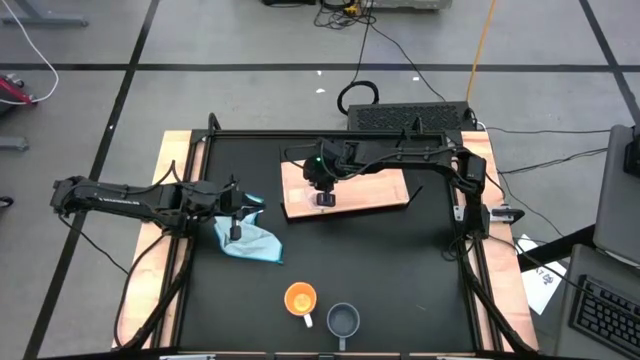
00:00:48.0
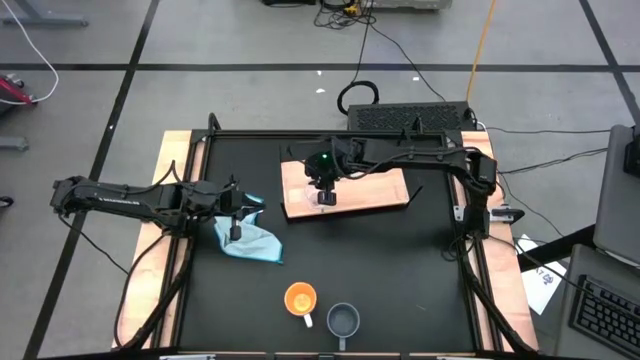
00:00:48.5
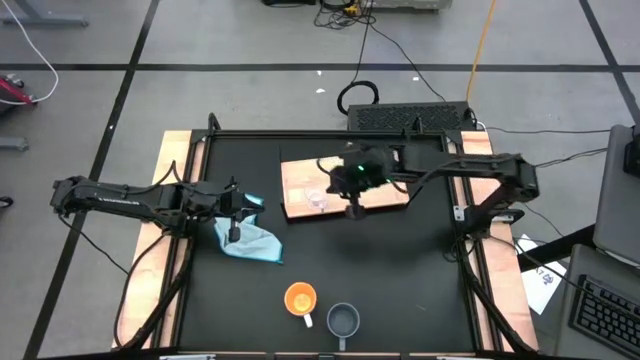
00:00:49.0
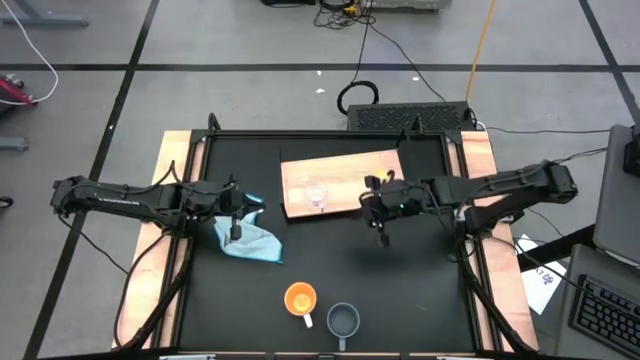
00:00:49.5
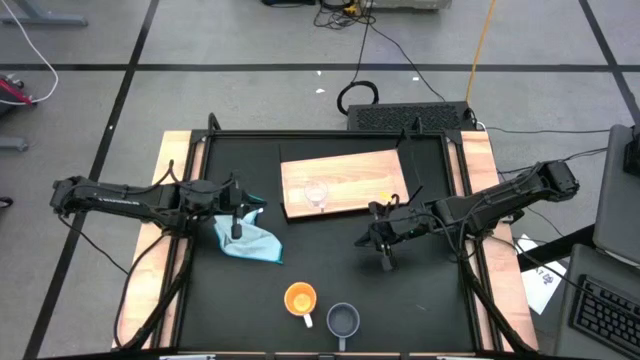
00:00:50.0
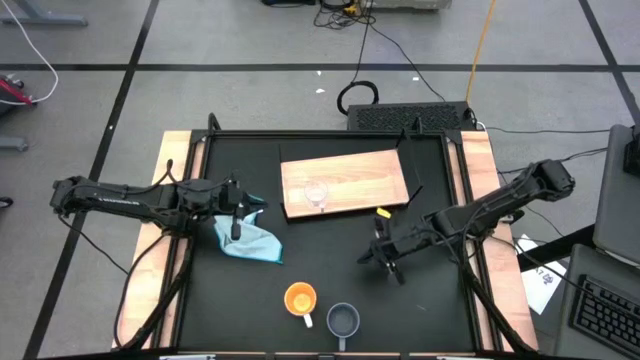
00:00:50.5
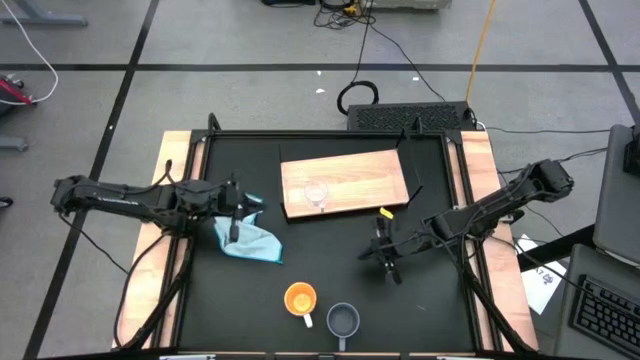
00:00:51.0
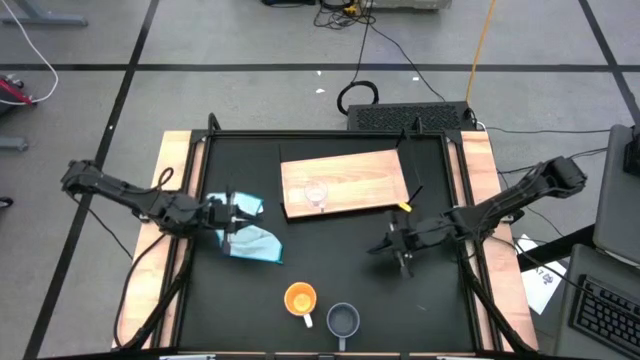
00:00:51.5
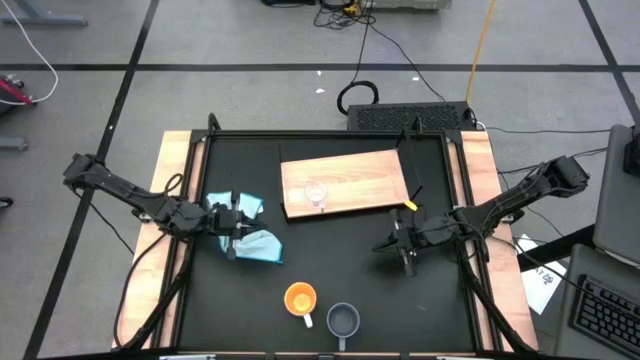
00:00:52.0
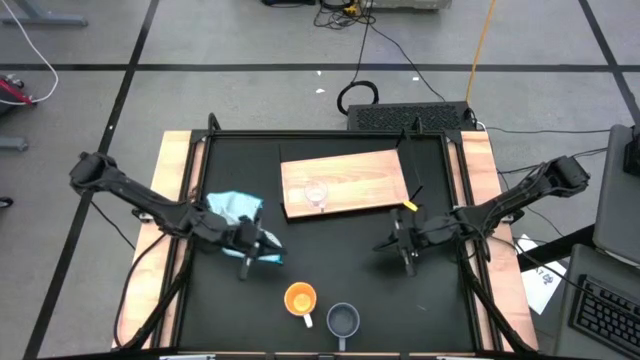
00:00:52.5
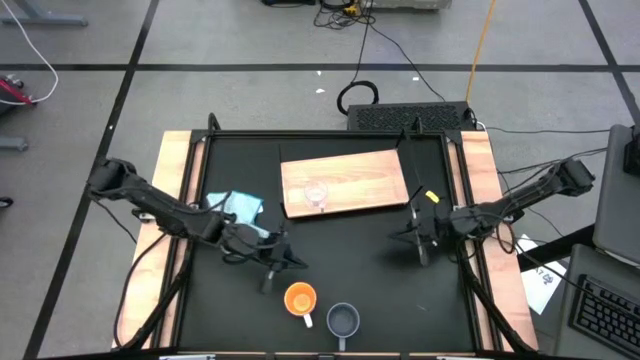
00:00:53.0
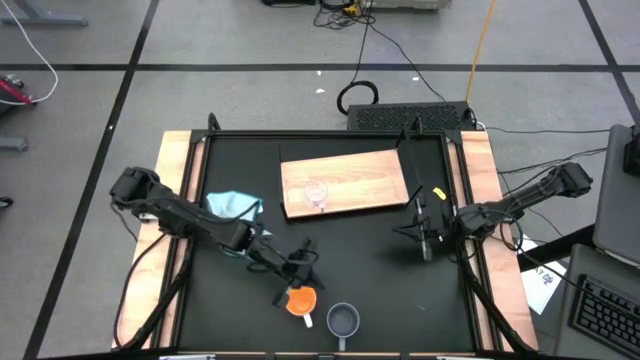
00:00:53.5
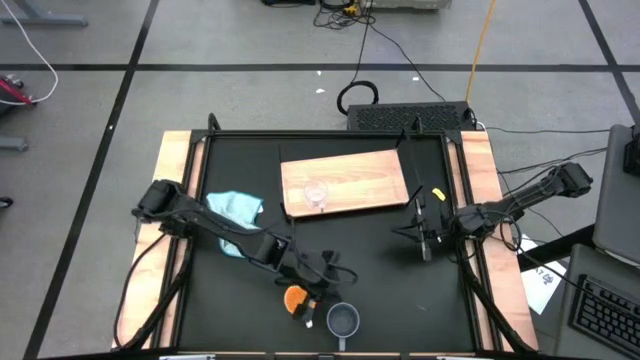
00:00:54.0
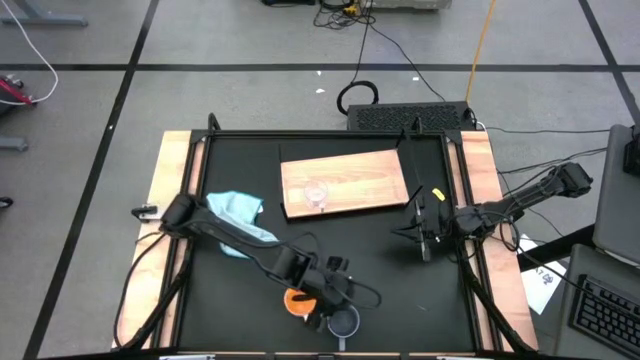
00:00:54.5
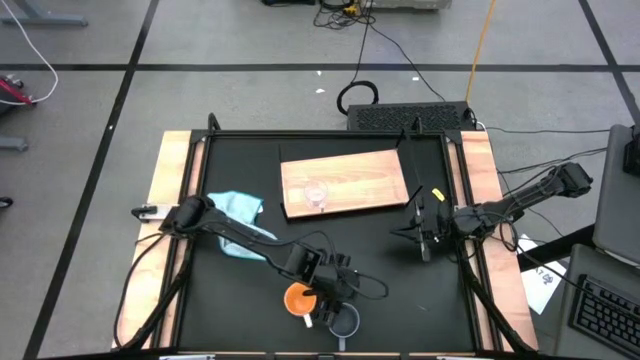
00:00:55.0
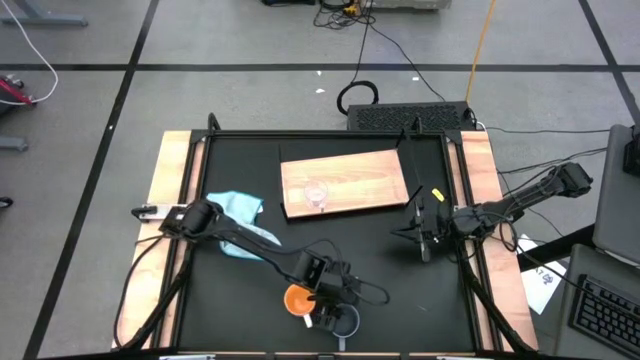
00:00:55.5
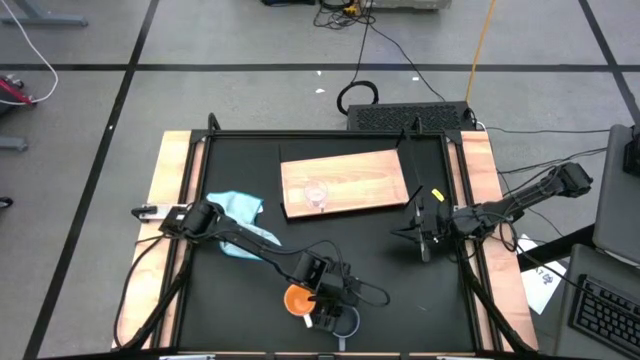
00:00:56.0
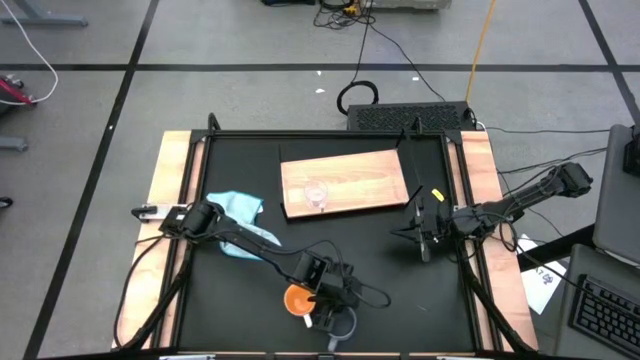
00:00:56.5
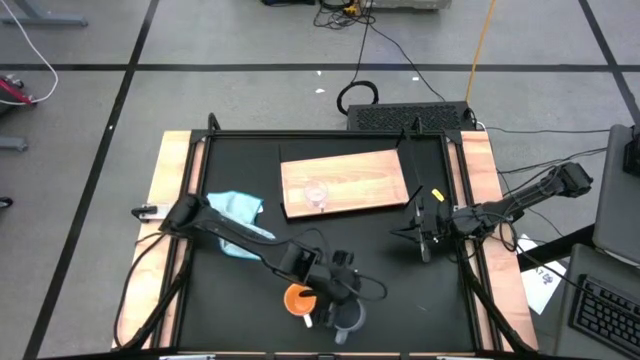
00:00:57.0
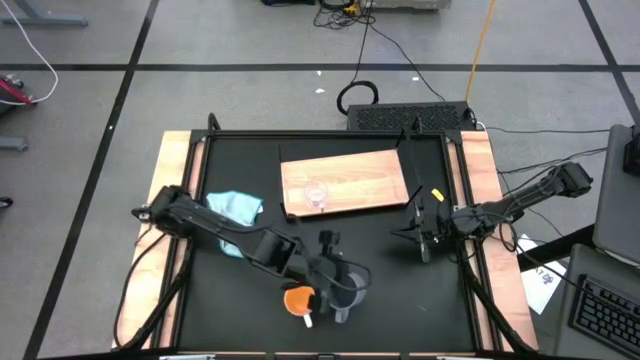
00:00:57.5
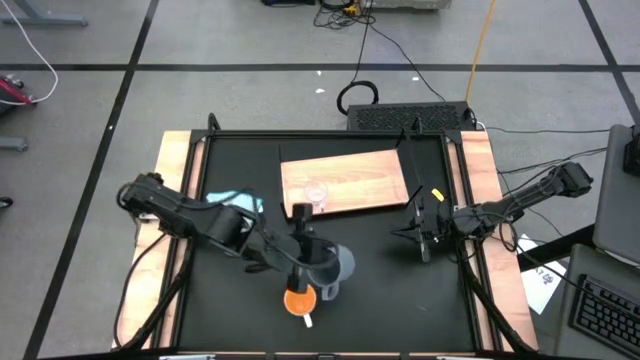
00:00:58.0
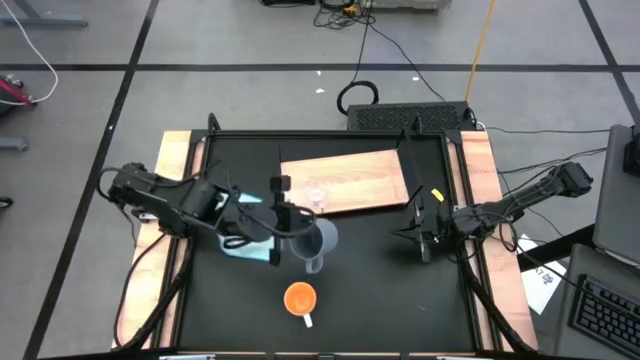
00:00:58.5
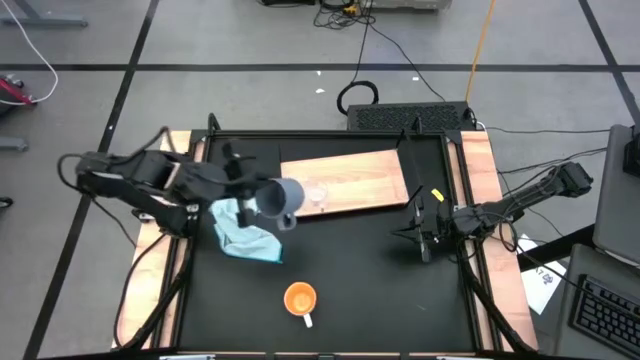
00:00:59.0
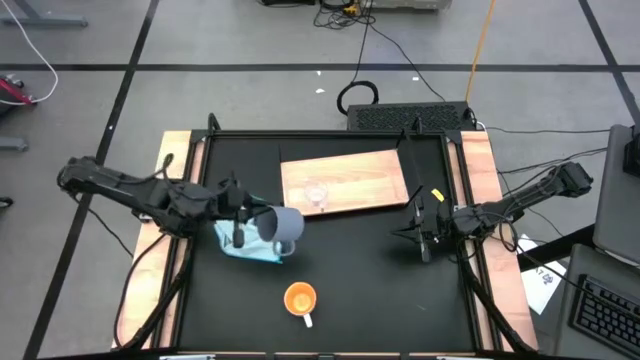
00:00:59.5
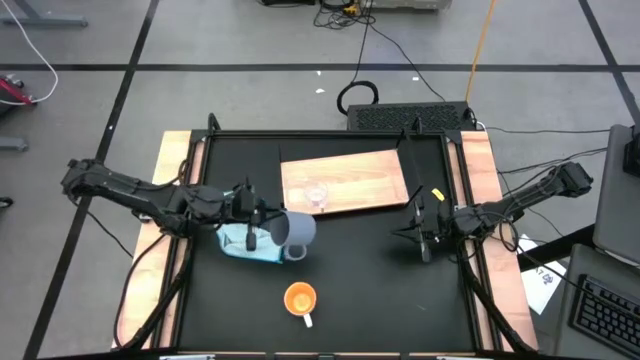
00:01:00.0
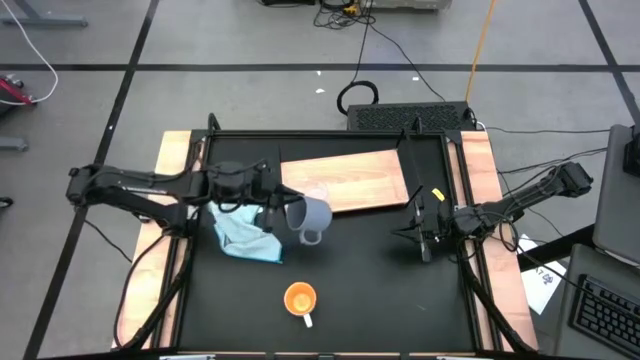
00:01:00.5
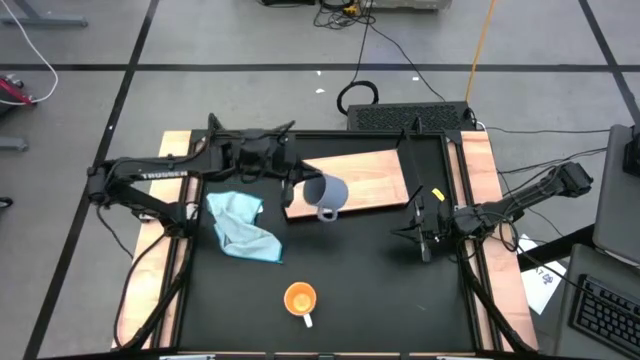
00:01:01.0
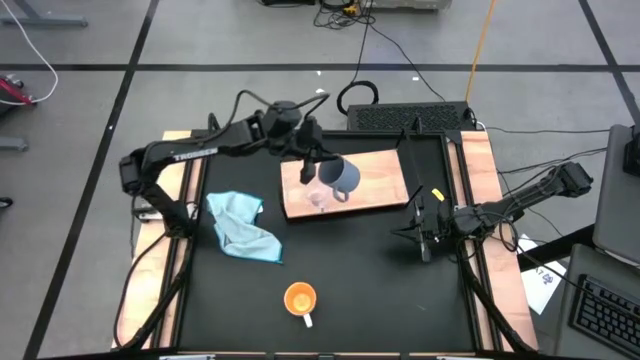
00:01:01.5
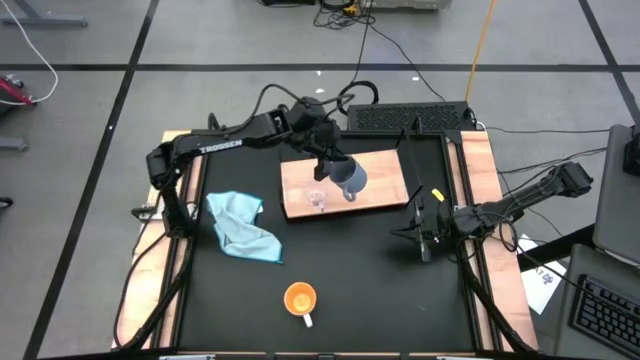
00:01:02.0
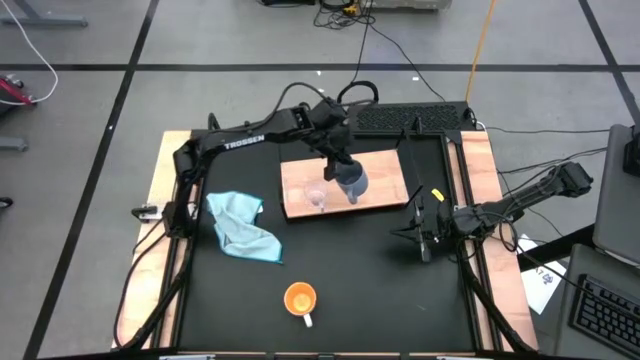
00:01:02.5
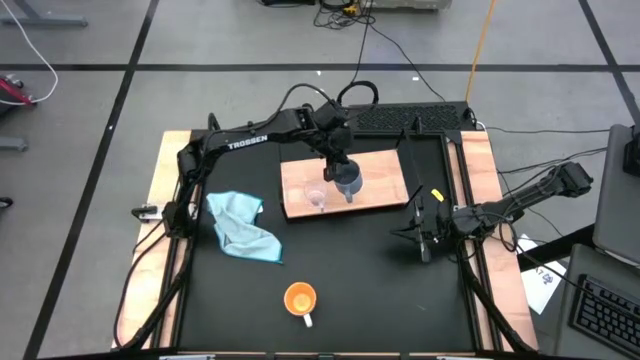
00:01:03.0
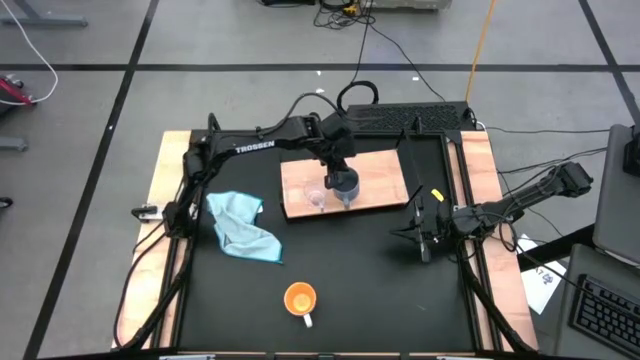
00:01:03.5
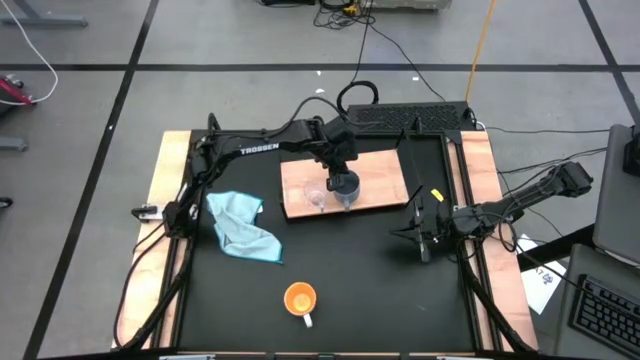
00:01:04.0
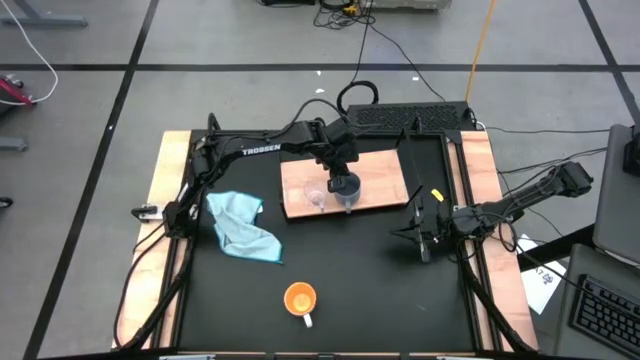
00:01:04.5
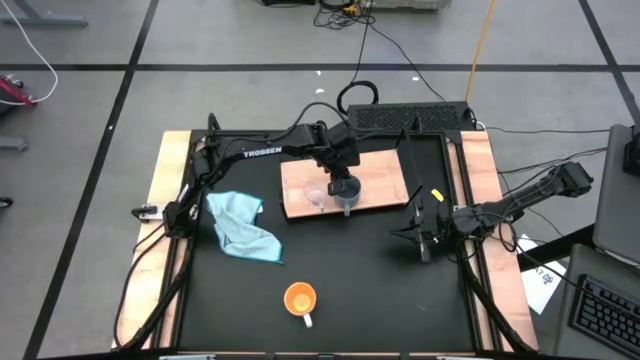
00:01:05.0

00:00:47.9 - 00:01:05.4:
Task: Stack small to large cups/mugs on shelf
Put the gray mug on the shelf
